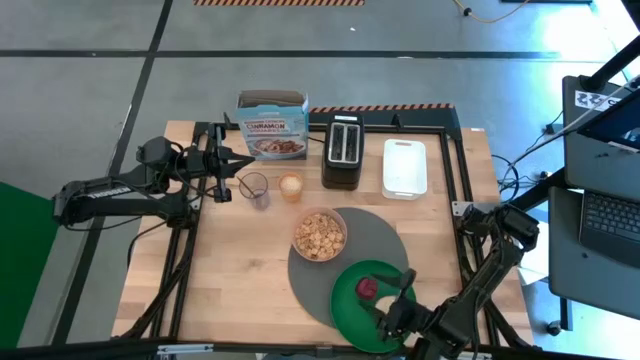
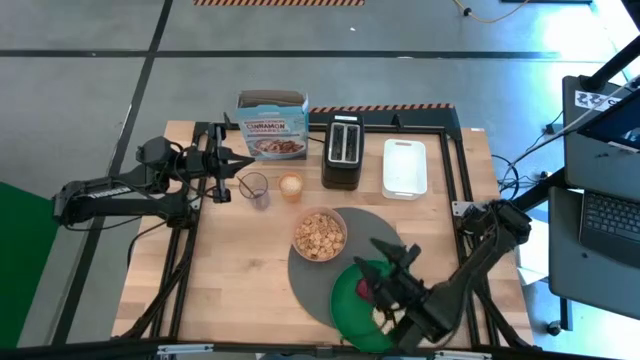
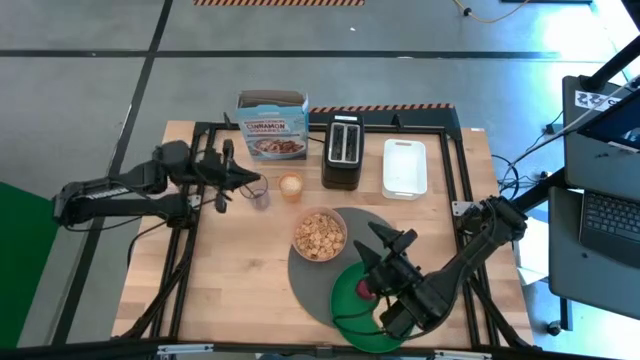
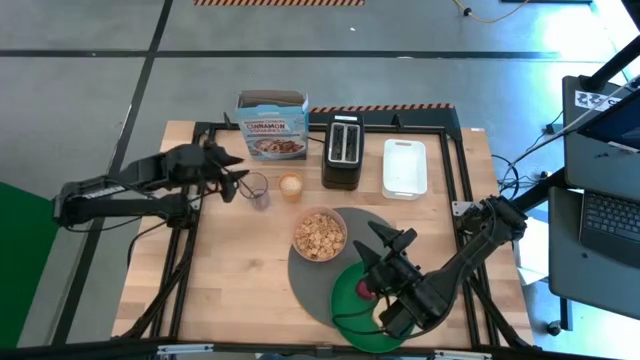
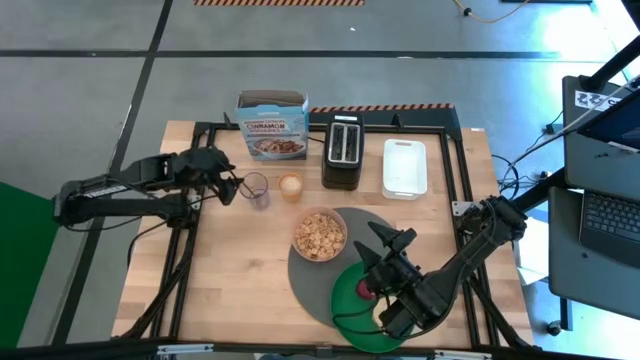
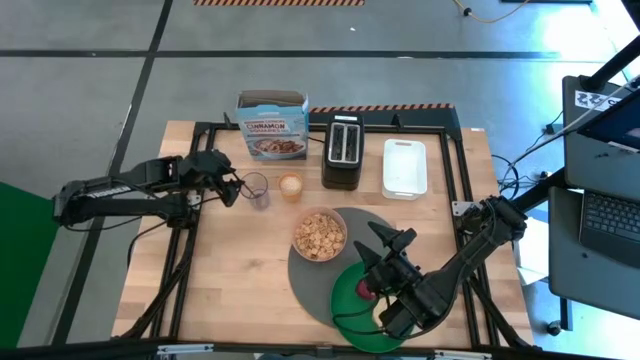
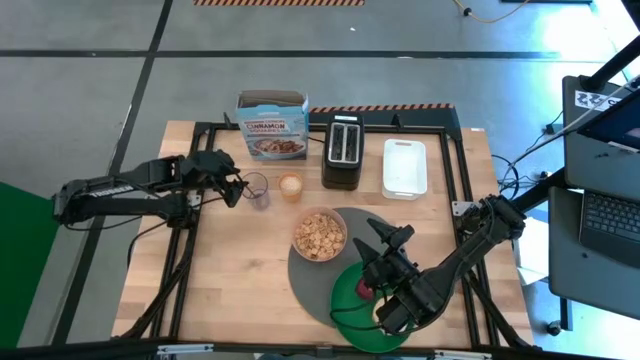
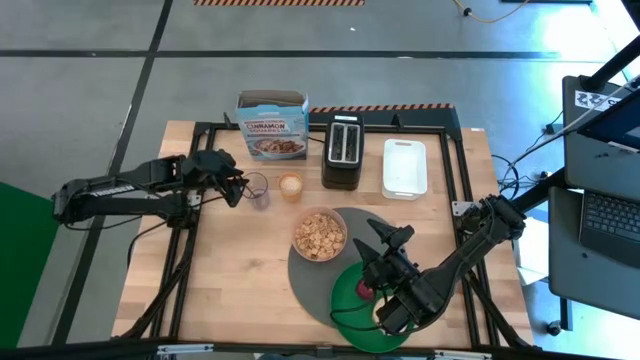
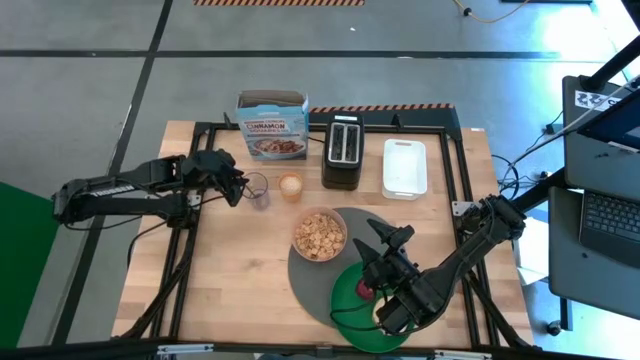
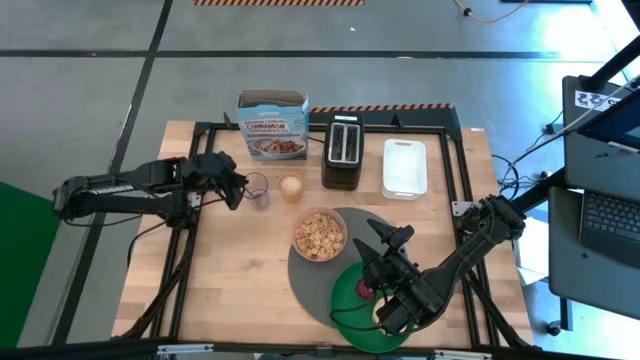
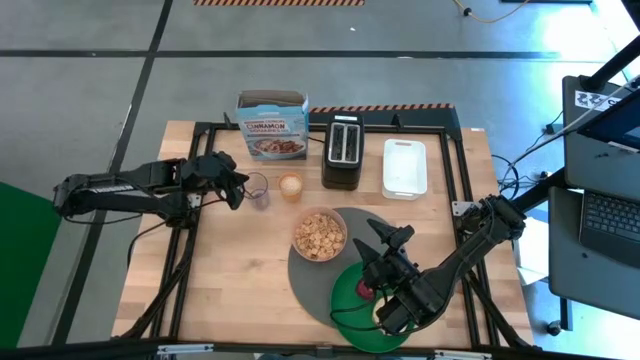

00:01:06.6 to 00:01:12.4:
Task: Arrange a breakfast setting
Put the gold spoon on the gray table mat

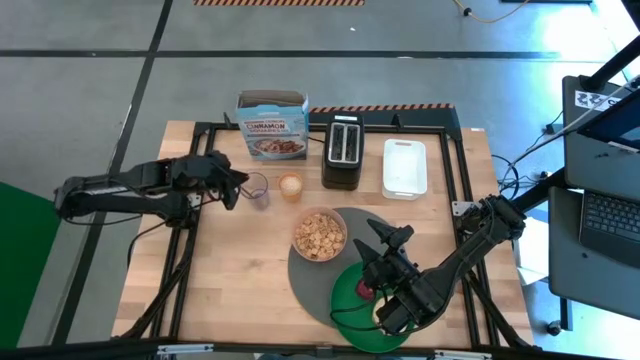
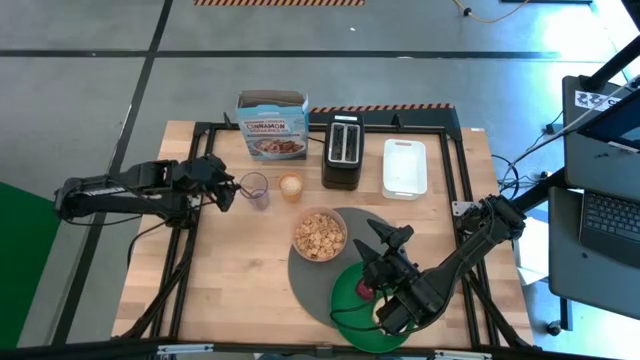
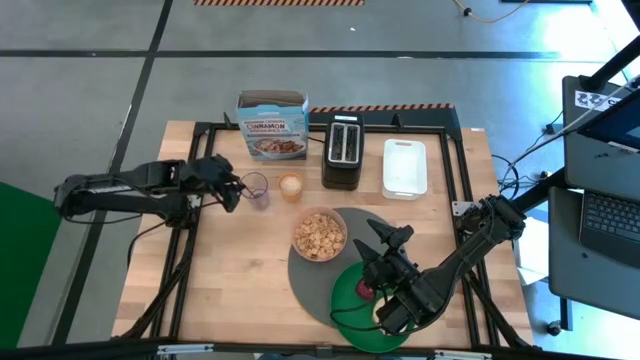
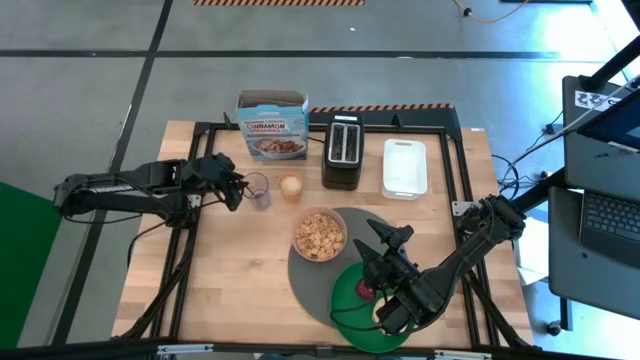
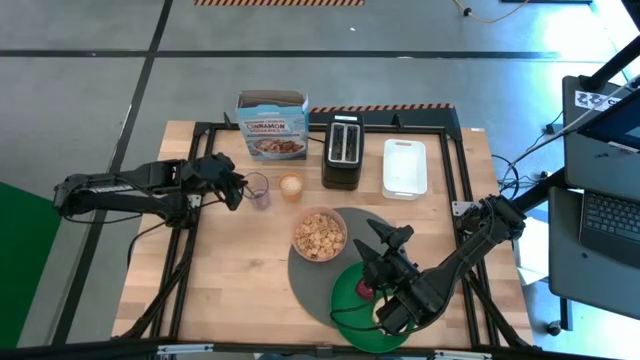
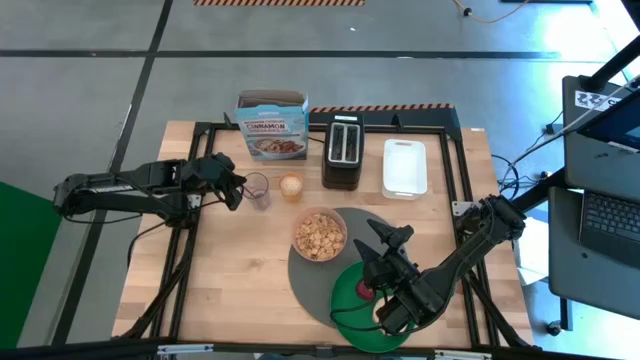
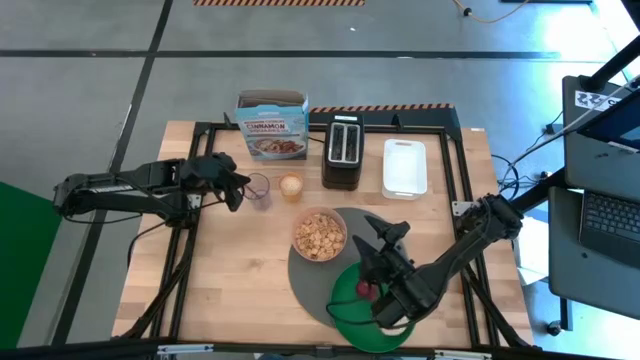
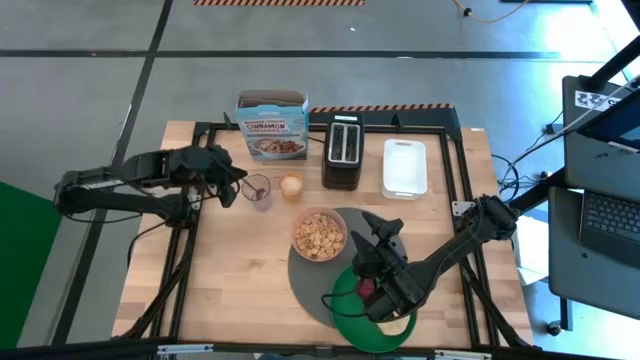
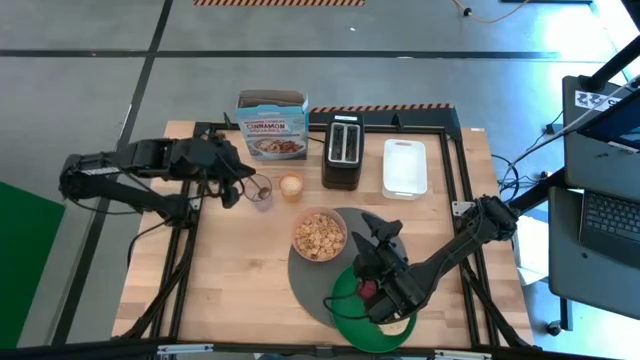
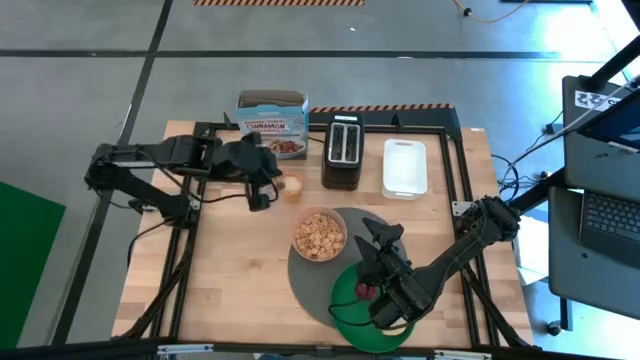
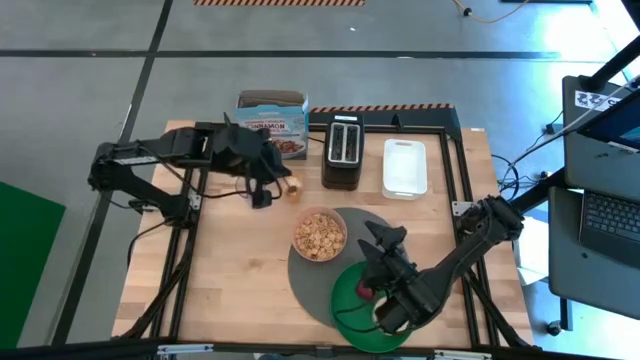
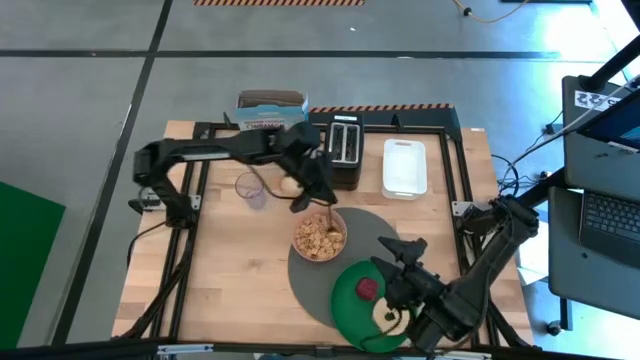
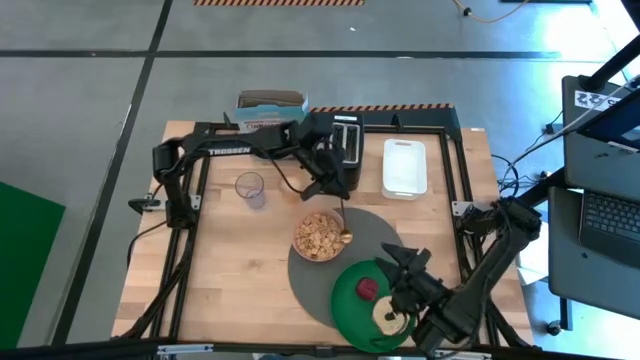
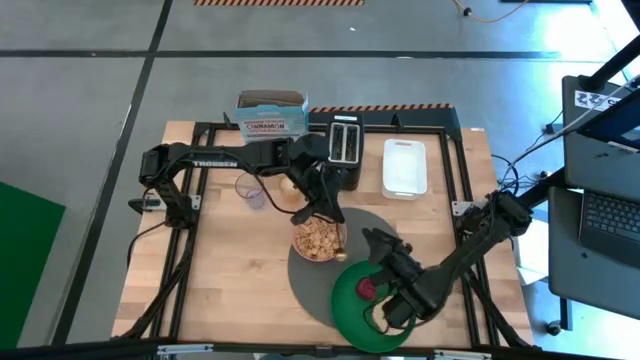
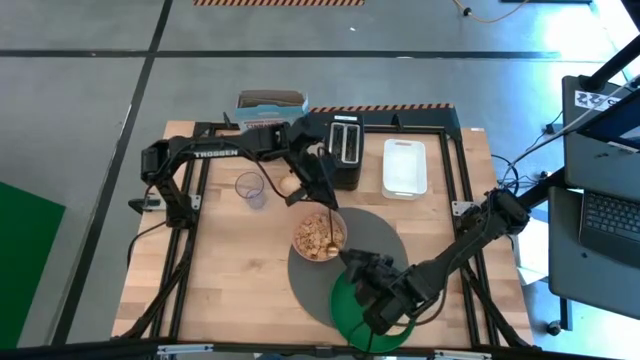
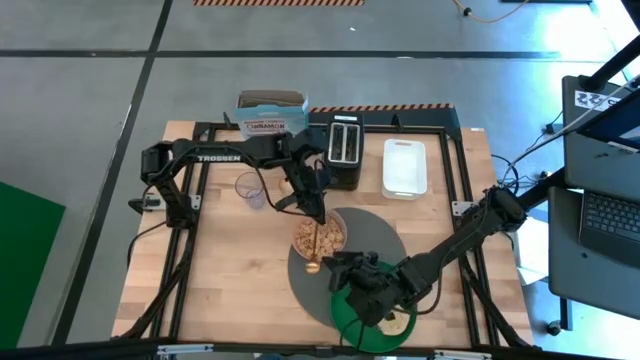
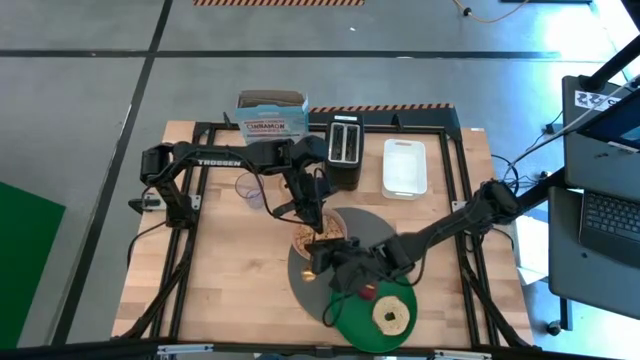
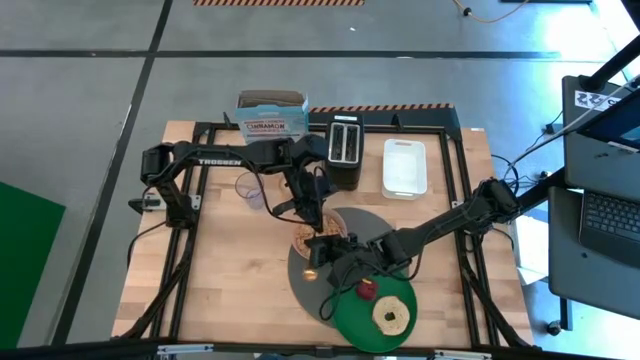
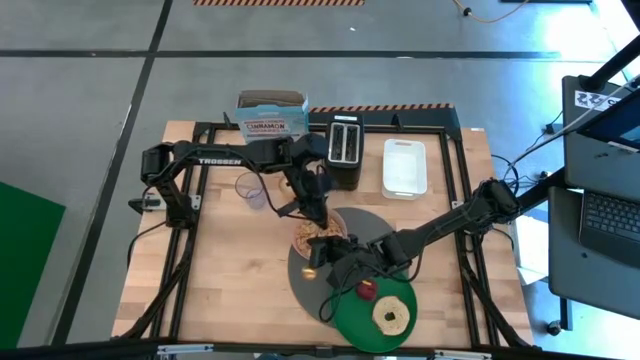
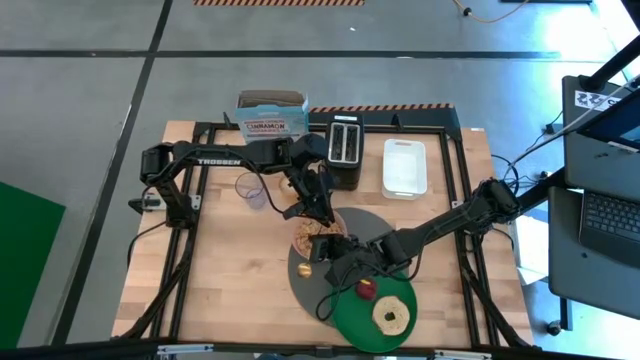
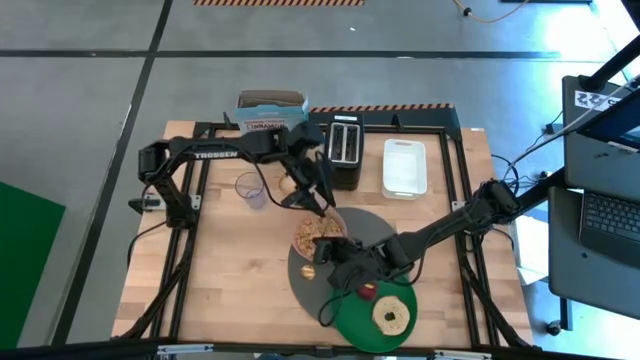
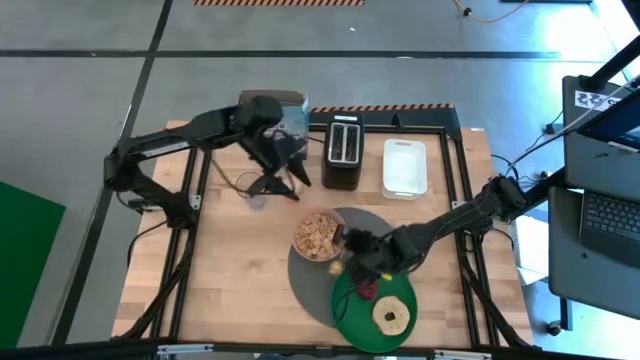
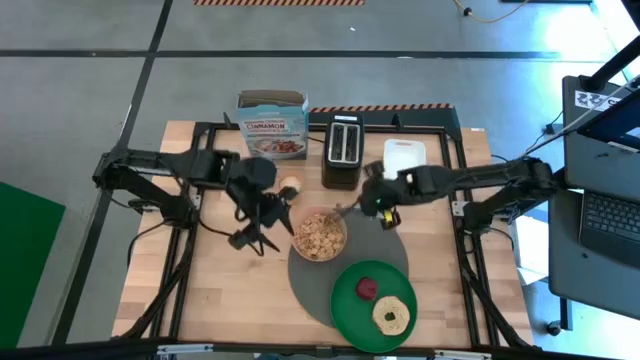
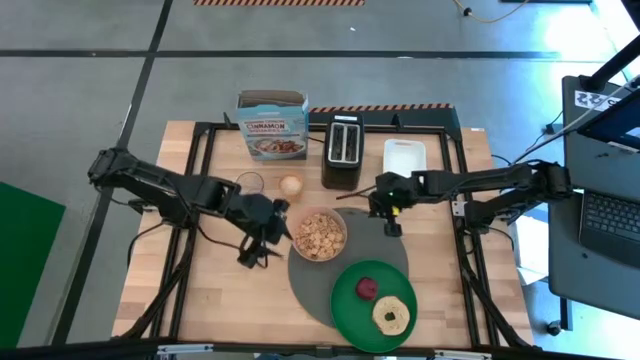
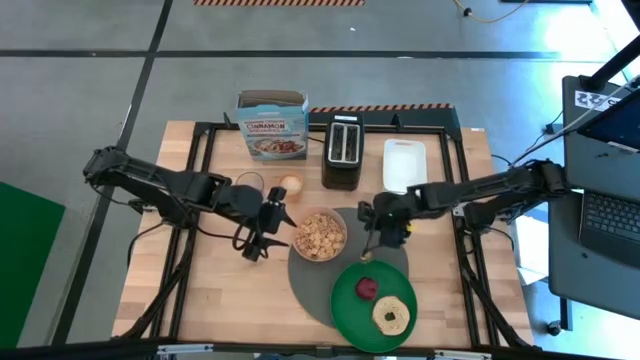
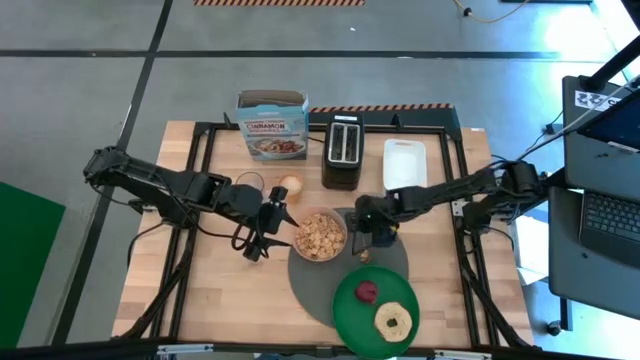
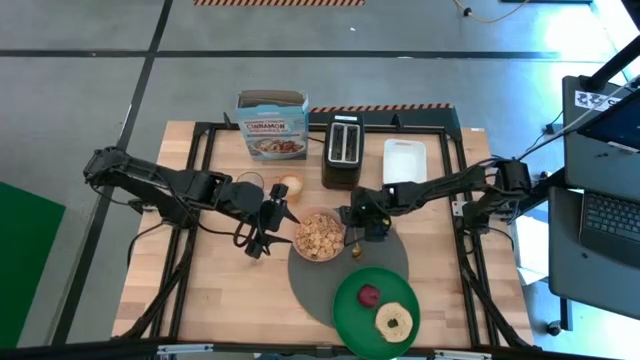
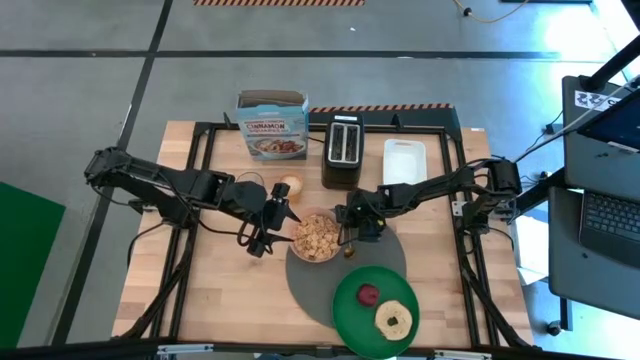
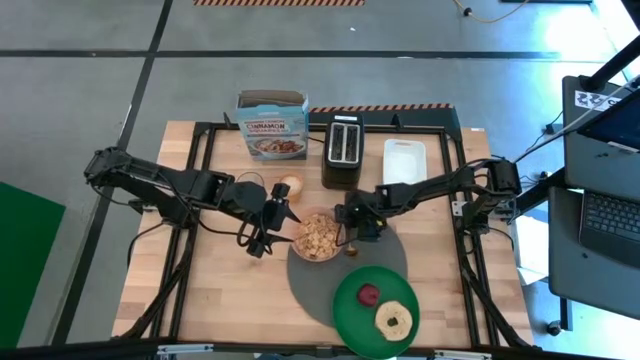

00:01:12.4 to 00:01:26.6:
Put the gold spoon on the gray table mat
